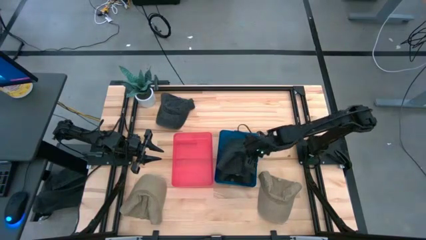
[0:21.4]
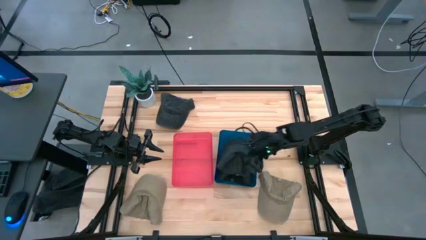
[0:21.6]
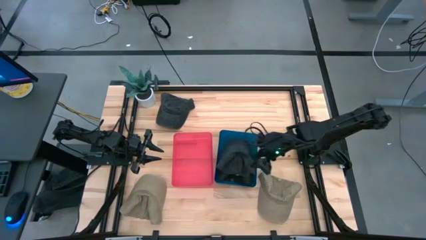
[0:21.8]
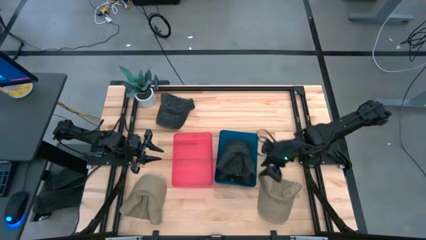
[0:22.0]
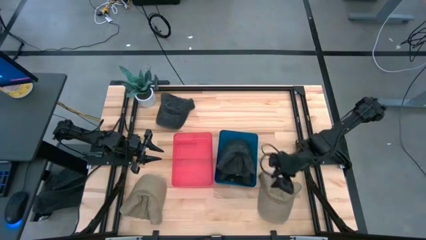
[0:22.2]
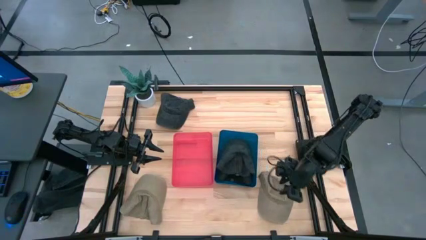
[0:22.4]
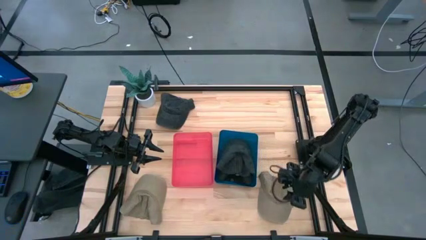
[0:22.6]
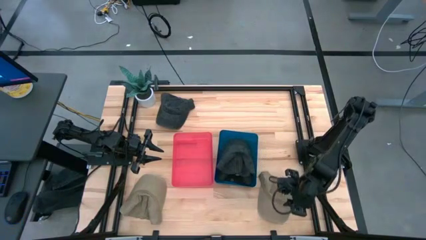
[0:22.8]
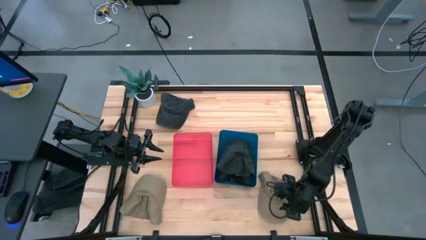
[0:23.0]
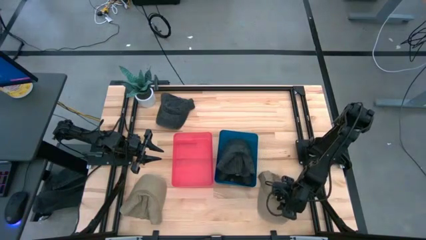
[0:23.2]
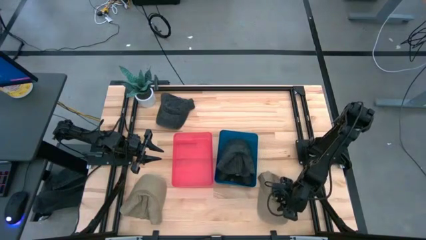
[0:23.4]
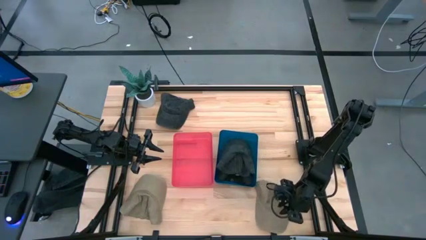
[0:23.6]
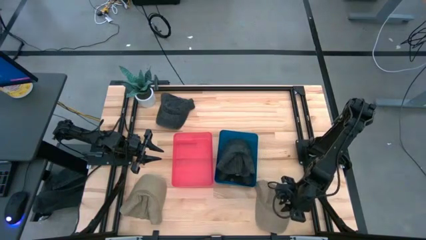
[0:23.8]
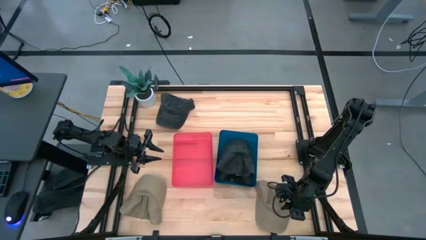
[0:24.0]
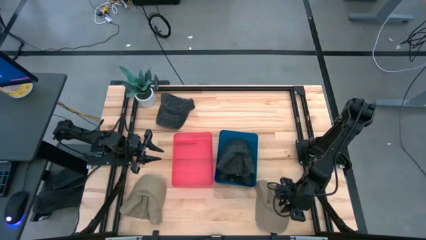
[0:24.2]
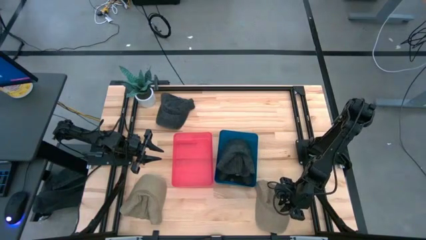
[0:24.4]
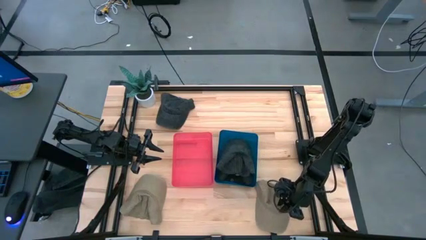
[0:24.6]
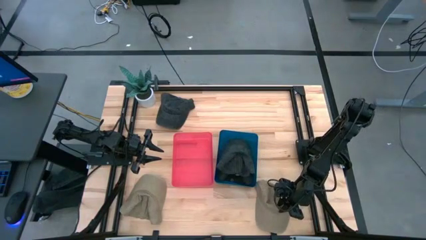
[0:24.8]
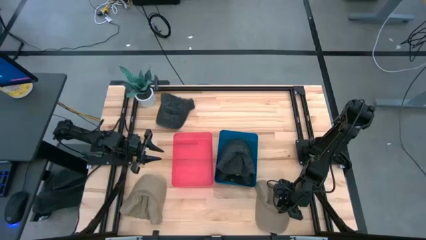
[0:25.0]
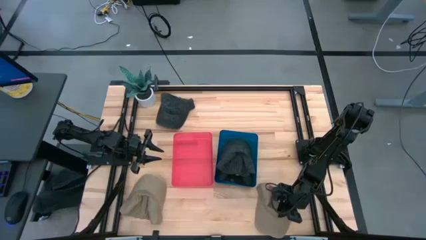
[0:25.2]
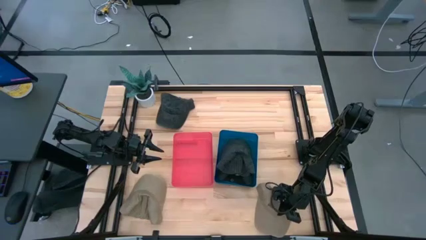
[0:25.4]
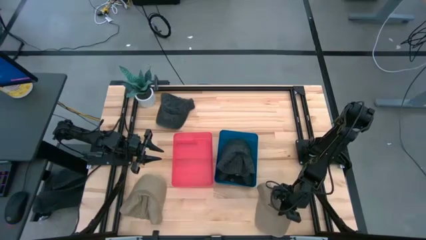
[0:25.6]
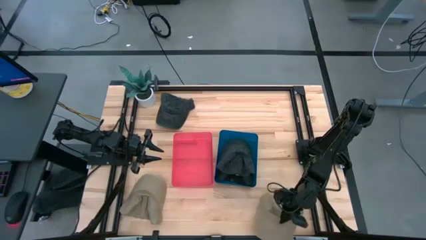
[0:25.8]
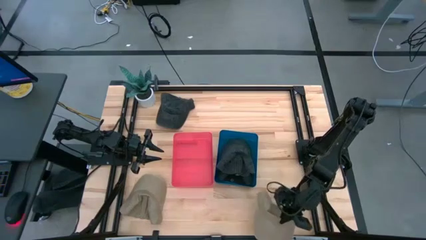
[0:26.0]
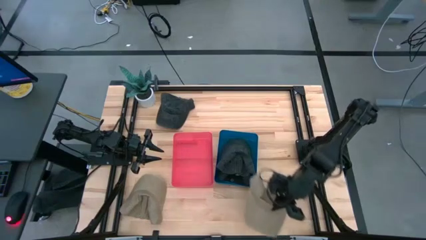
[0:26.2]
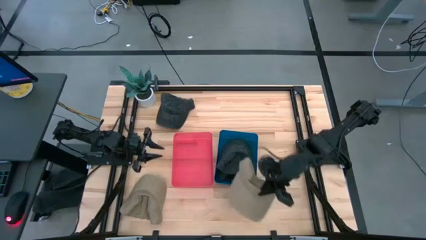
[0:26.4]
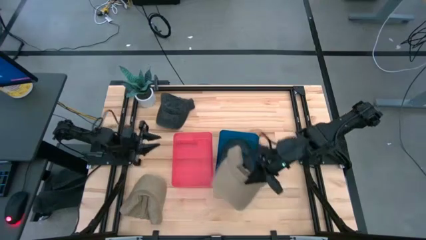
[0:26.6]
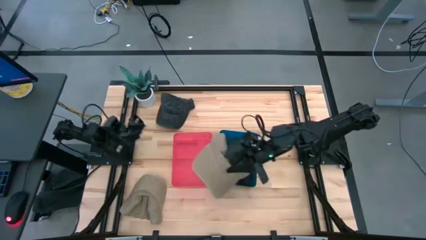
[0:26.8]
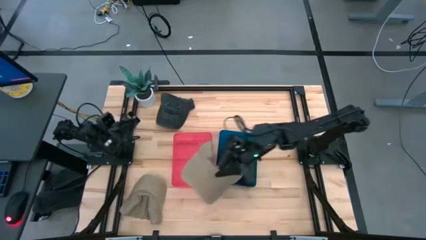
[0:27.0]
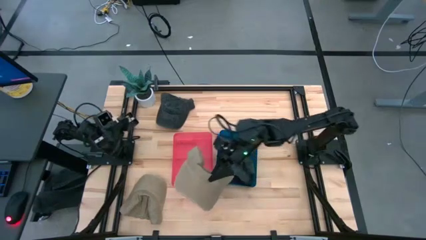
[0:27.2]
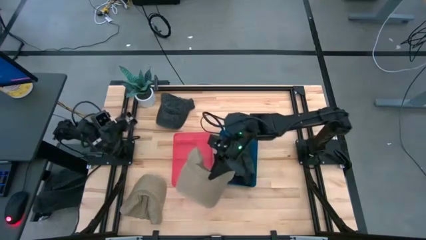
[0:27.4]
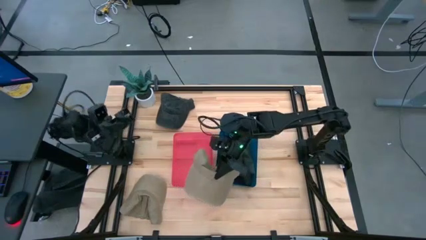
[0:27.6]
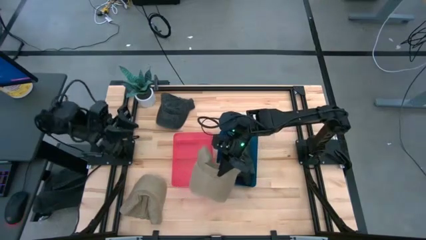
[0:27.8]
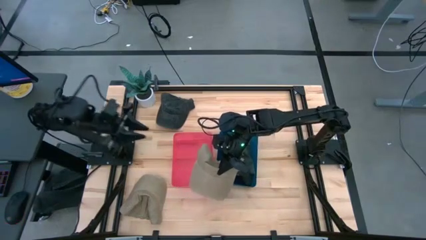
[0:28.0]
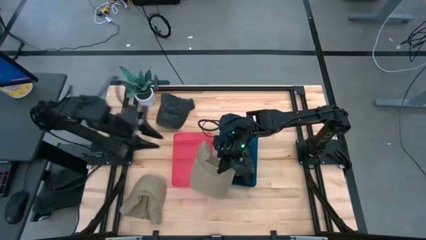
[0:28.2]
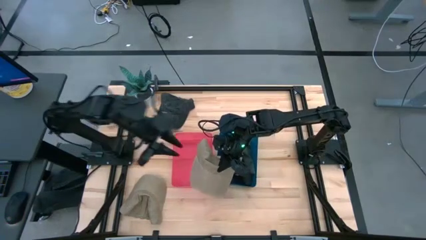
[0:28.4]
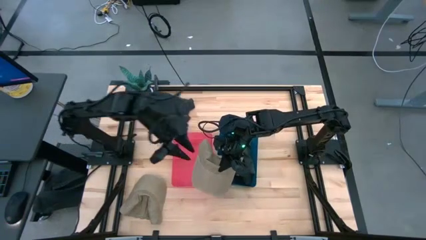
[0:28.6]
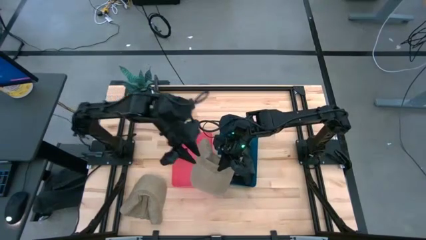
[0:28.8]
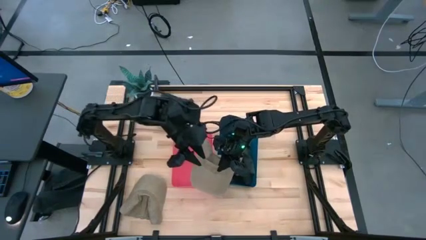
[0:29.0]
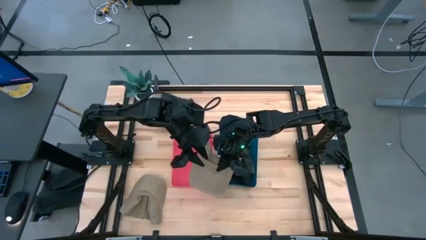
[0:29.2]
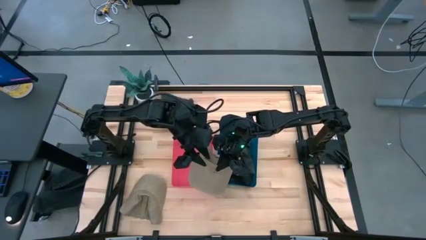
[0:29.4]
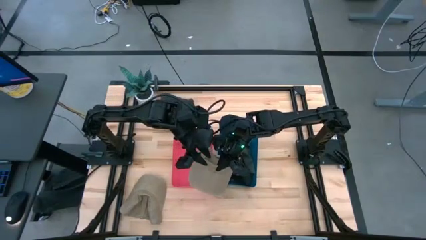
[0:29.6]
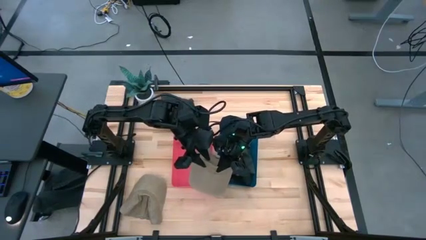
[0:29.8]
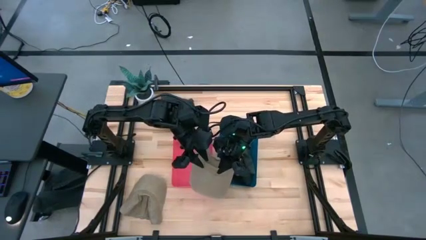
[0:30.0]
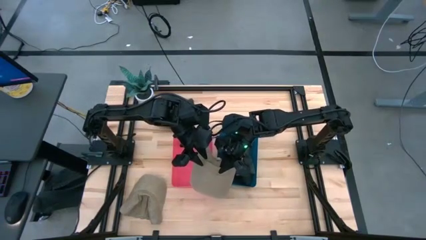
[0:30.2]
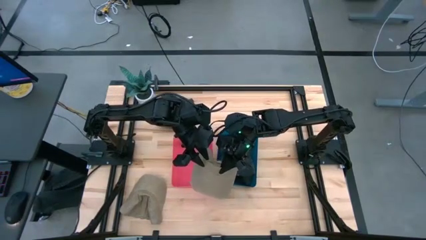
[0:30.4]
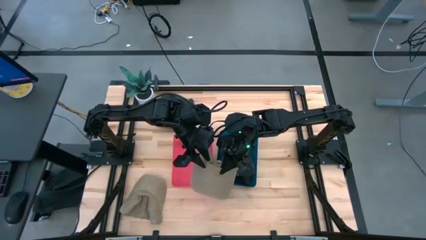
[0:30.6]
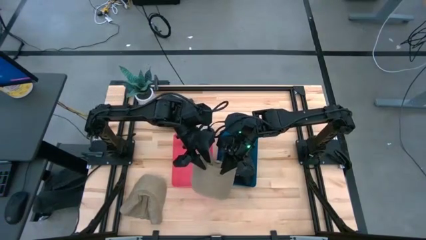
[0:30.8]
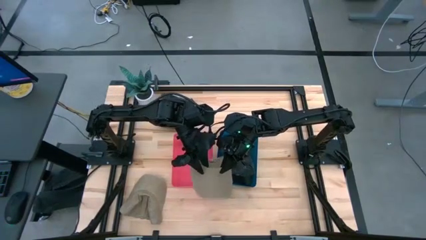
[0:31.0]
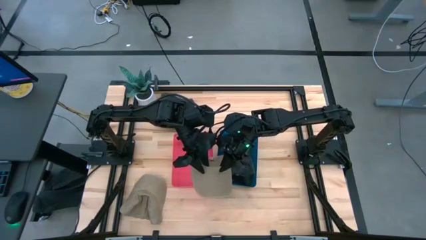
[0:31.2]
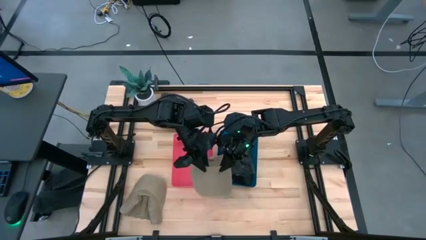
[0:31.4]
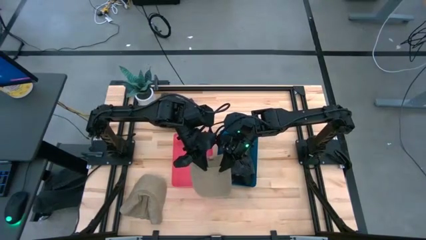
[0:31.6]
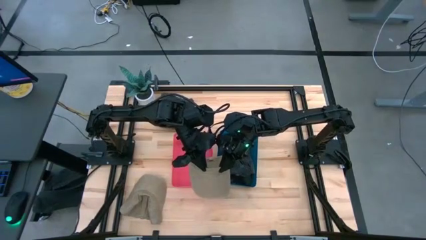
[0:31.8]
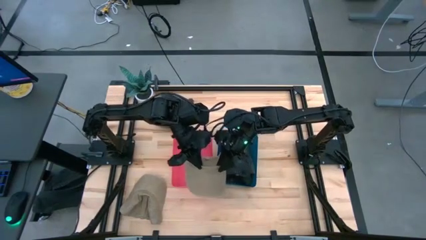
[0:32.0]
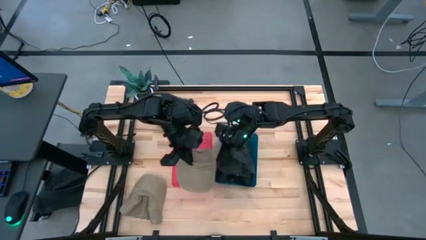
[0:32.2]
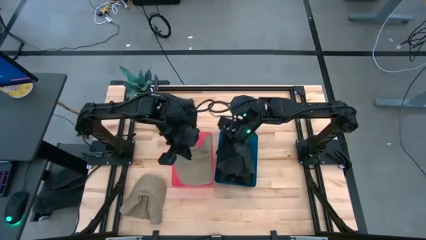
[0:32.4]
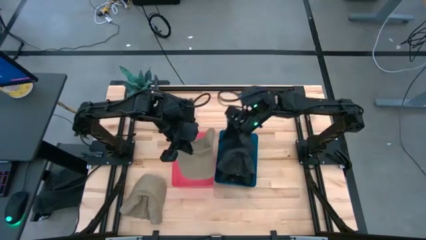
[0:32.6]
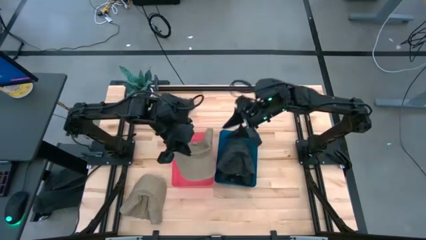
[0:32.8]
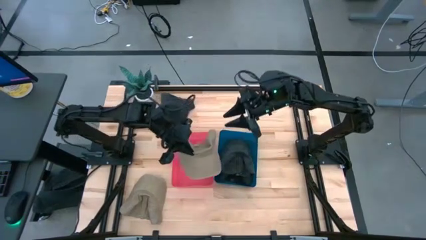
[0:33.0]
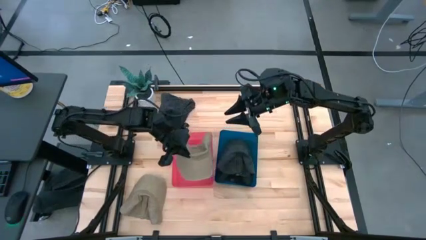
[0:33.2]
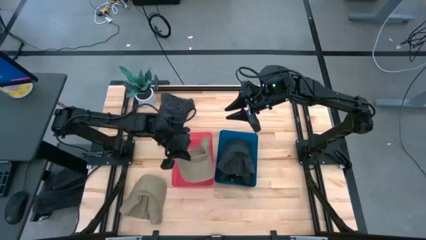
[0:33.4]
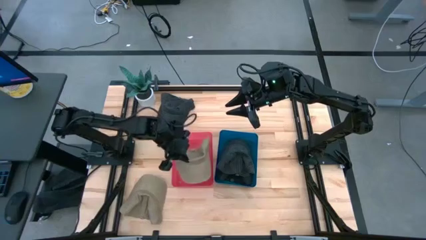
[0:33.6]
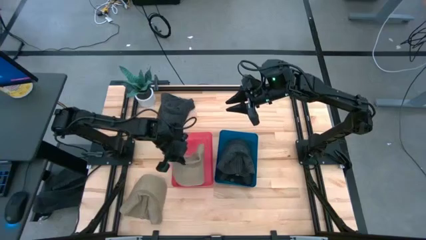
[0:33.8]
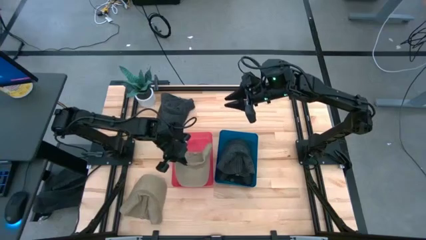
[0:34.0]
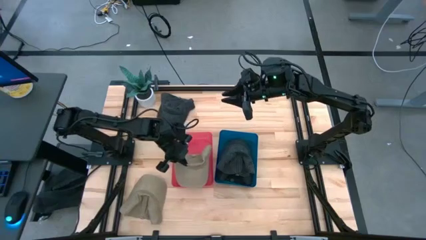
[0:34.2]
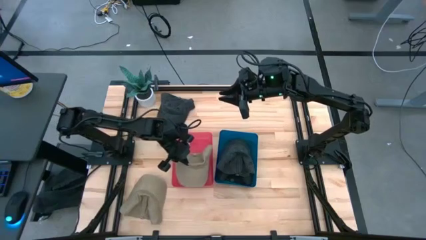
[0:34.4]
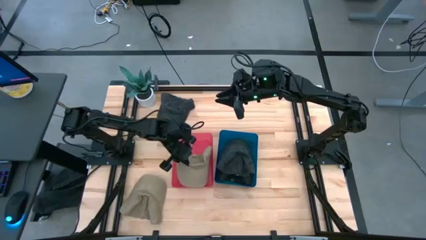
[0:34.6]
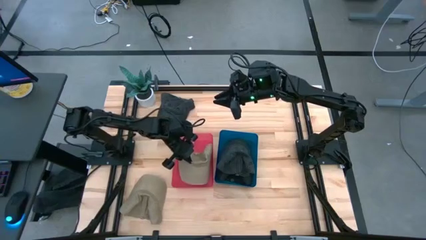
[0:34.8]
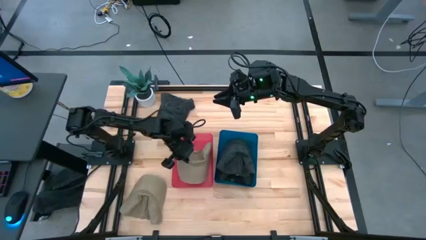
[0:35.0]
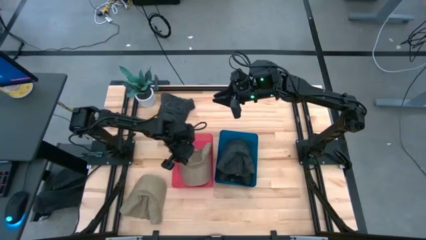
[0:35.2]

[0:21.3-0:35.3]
Task: Pick & Place hat
Put the right brown cap into the red bin
